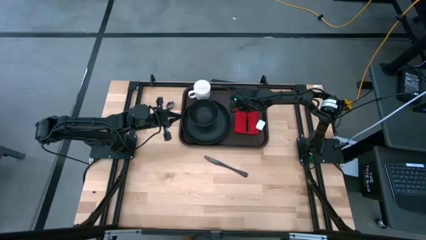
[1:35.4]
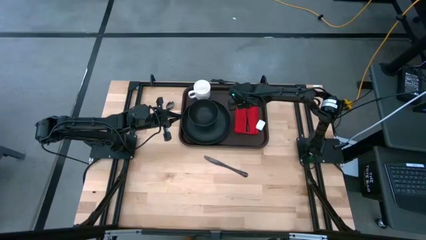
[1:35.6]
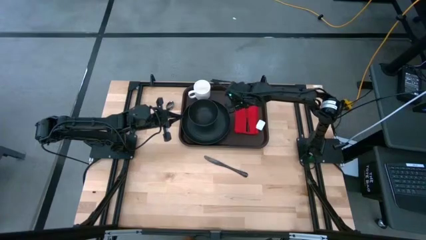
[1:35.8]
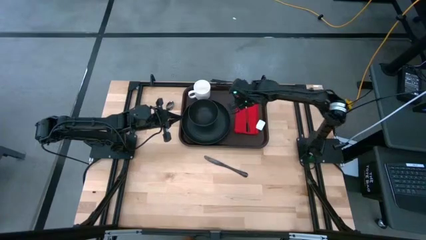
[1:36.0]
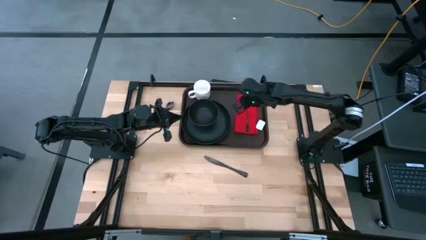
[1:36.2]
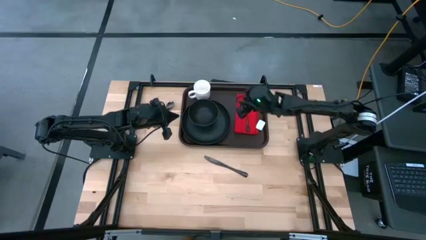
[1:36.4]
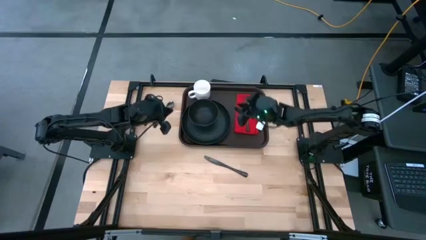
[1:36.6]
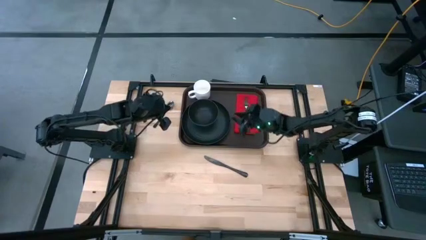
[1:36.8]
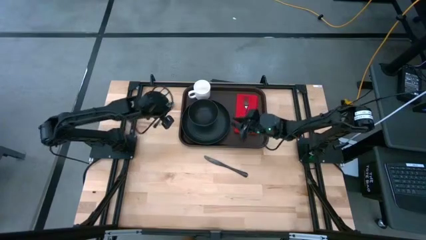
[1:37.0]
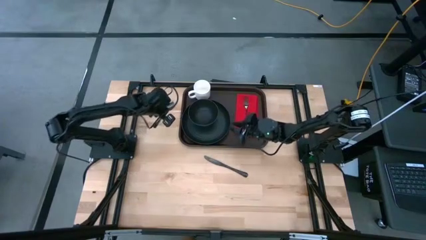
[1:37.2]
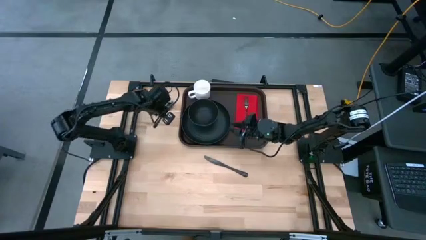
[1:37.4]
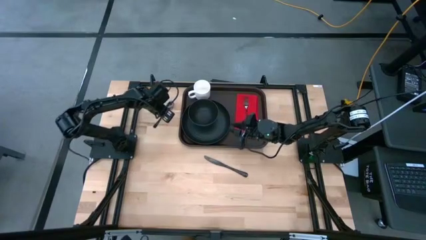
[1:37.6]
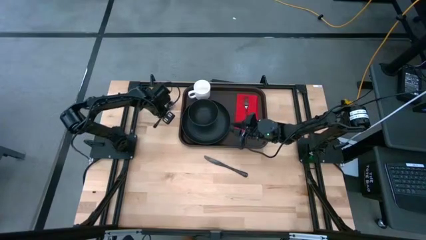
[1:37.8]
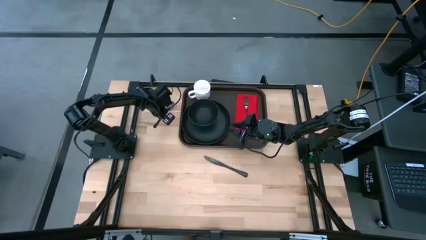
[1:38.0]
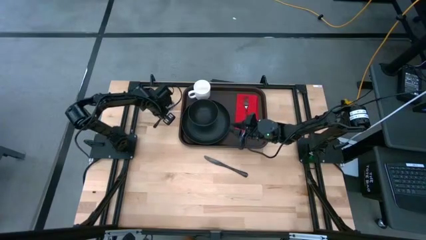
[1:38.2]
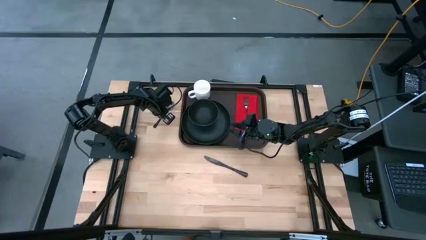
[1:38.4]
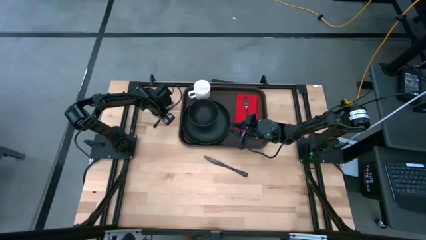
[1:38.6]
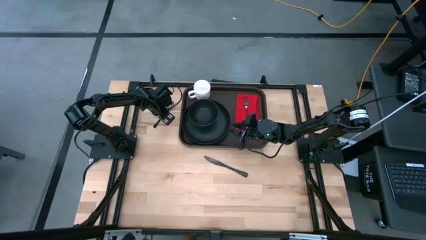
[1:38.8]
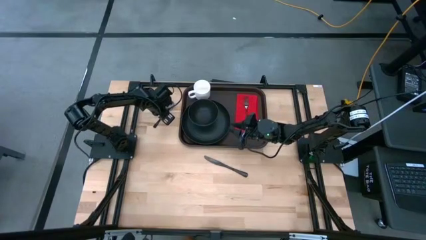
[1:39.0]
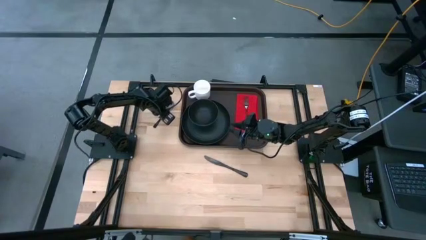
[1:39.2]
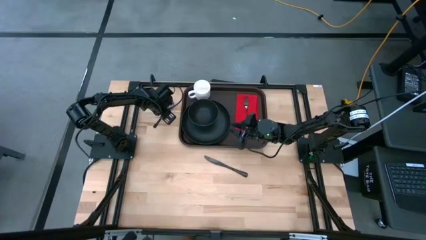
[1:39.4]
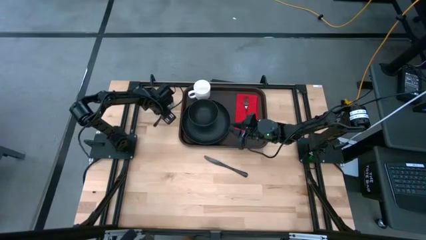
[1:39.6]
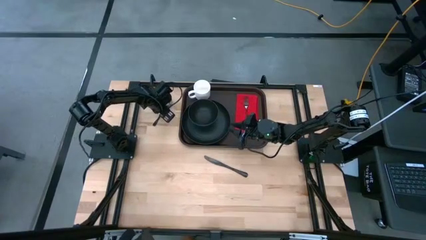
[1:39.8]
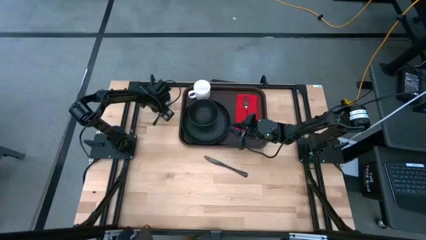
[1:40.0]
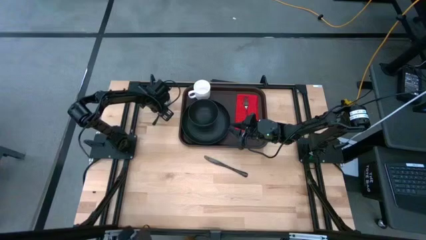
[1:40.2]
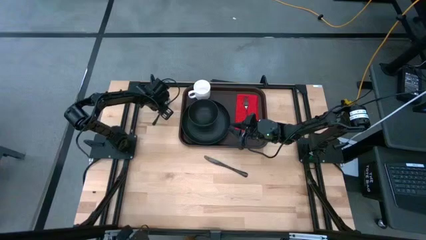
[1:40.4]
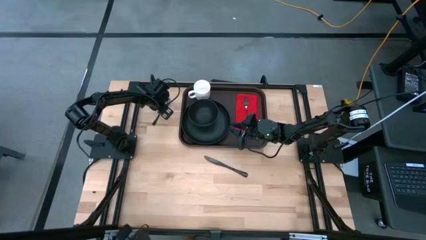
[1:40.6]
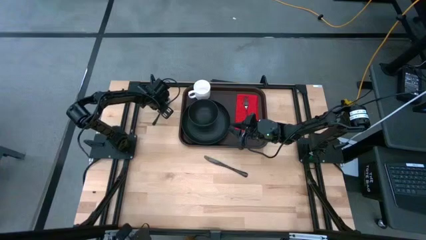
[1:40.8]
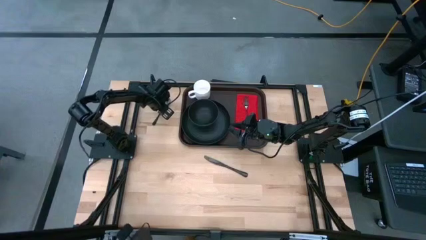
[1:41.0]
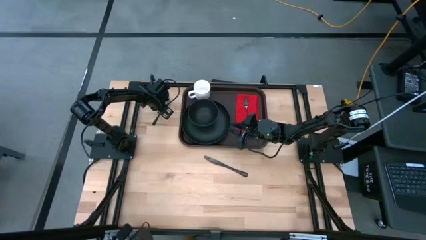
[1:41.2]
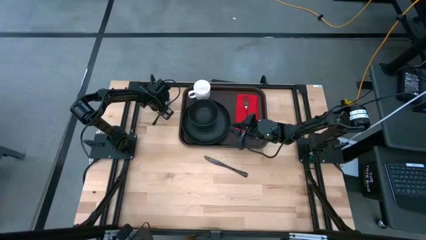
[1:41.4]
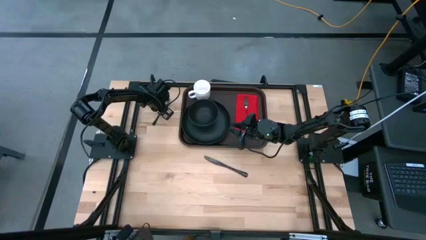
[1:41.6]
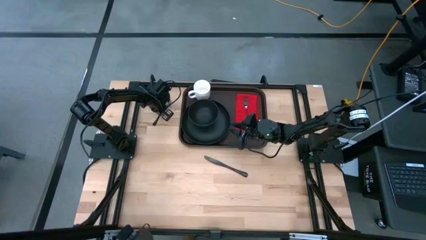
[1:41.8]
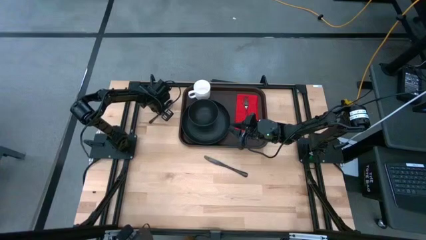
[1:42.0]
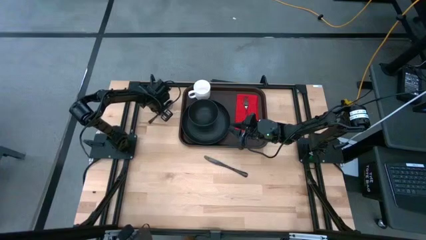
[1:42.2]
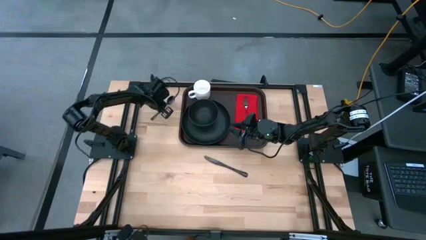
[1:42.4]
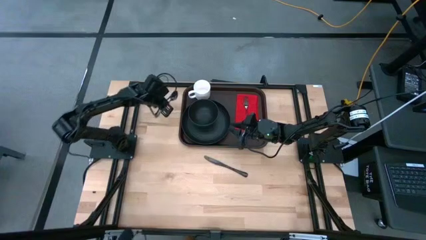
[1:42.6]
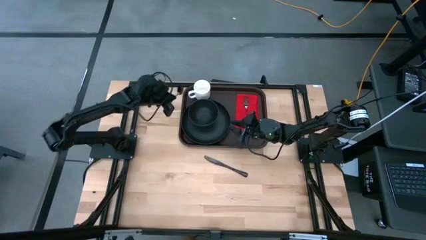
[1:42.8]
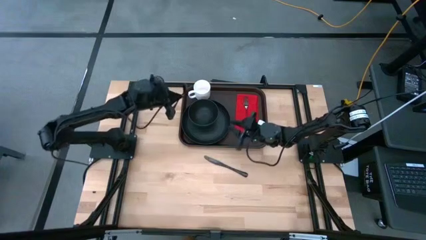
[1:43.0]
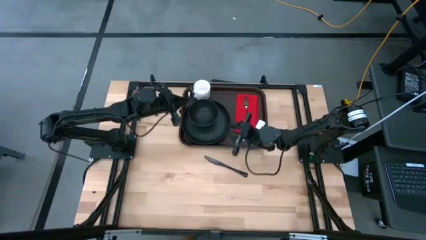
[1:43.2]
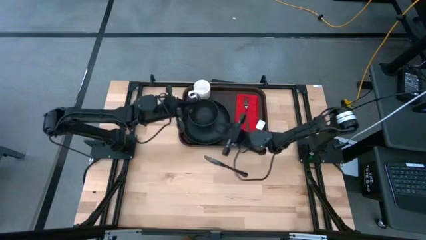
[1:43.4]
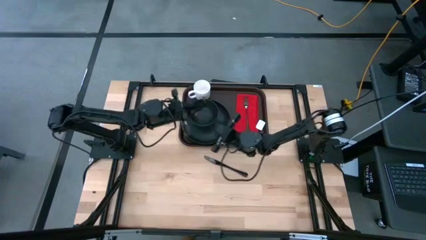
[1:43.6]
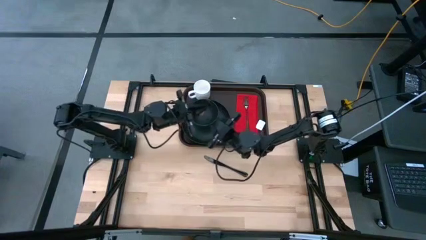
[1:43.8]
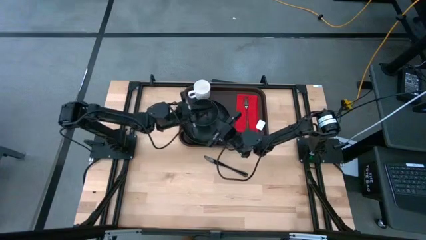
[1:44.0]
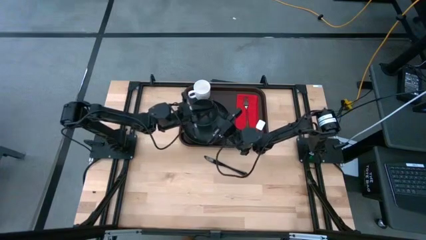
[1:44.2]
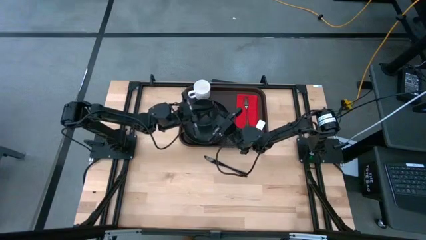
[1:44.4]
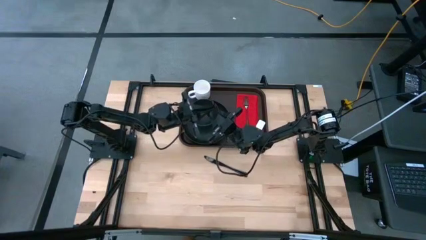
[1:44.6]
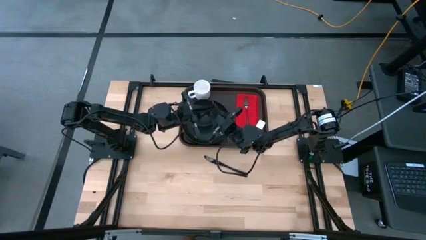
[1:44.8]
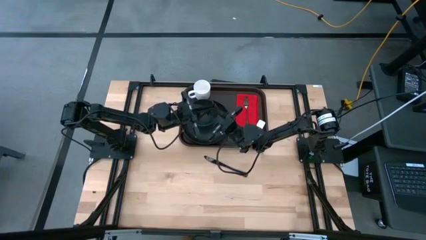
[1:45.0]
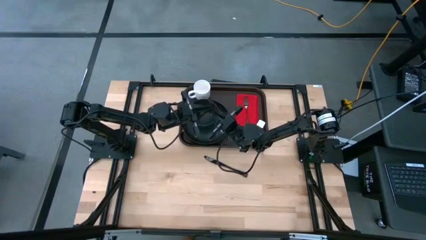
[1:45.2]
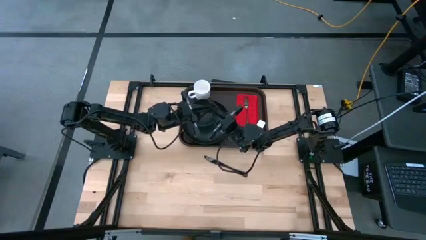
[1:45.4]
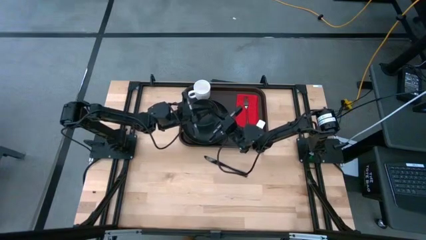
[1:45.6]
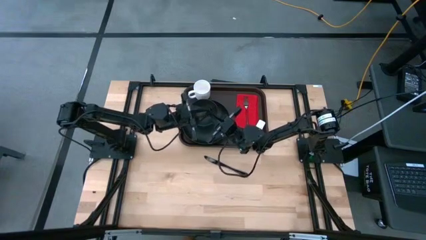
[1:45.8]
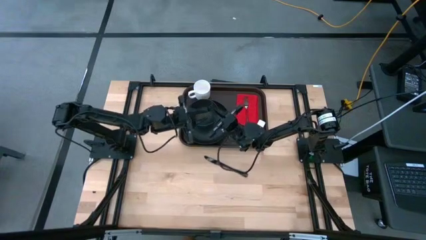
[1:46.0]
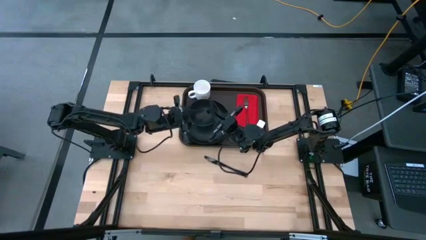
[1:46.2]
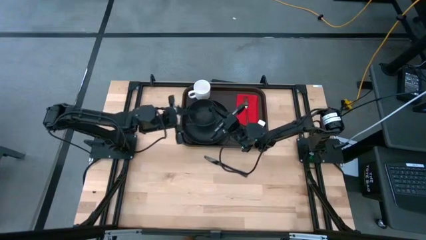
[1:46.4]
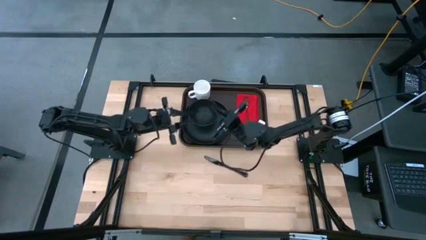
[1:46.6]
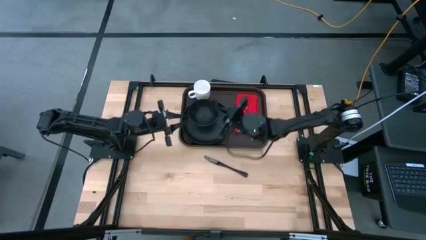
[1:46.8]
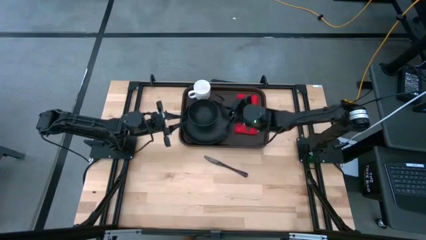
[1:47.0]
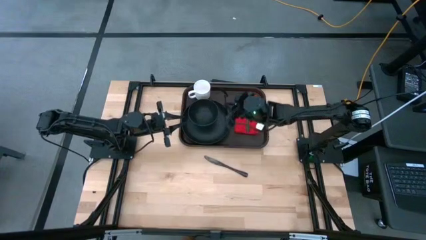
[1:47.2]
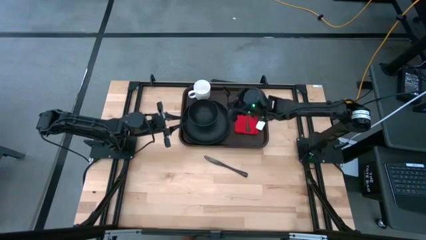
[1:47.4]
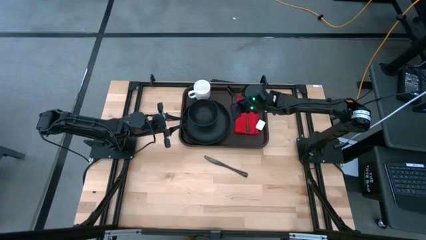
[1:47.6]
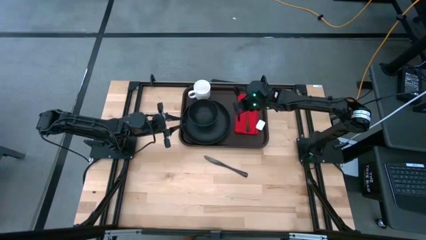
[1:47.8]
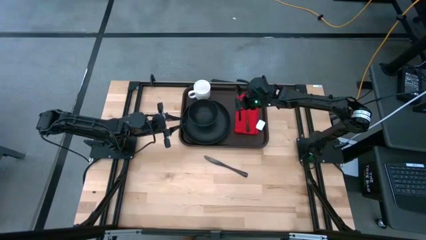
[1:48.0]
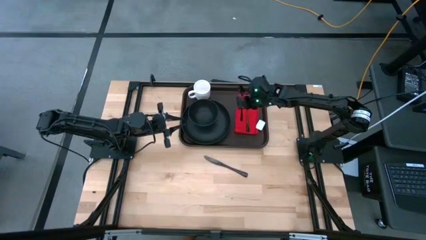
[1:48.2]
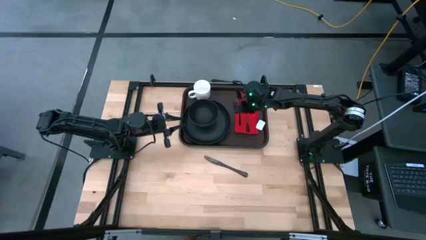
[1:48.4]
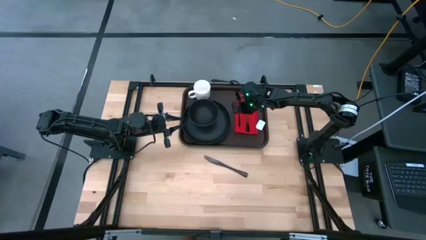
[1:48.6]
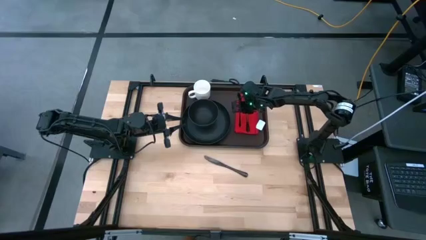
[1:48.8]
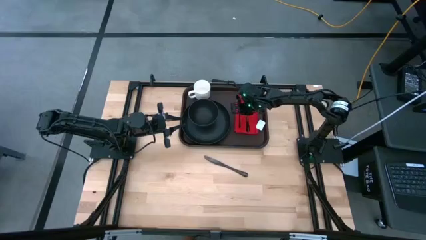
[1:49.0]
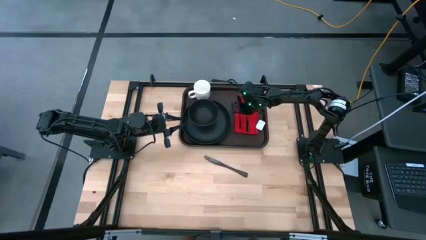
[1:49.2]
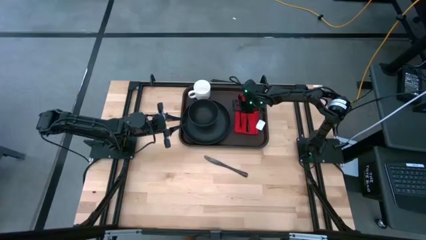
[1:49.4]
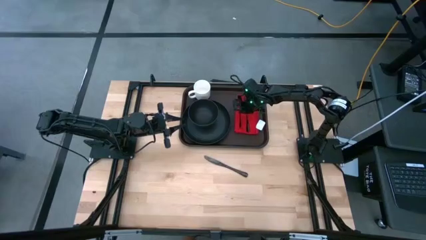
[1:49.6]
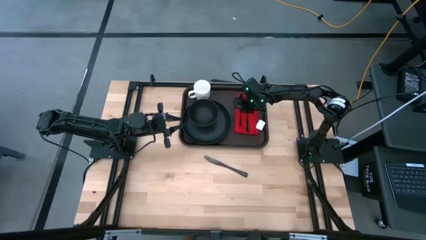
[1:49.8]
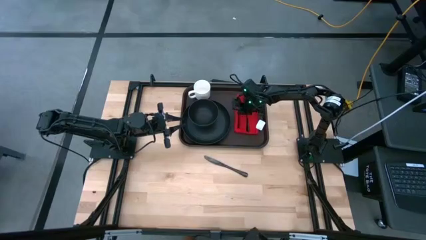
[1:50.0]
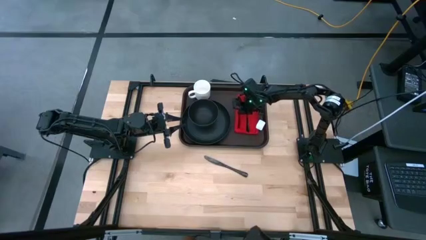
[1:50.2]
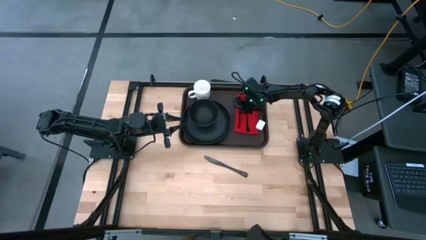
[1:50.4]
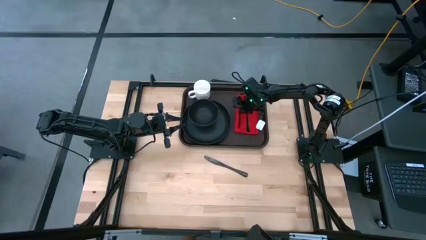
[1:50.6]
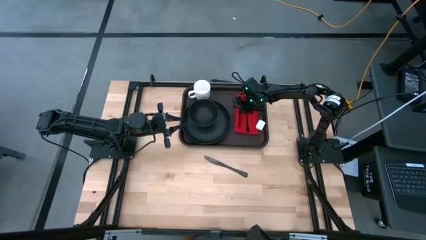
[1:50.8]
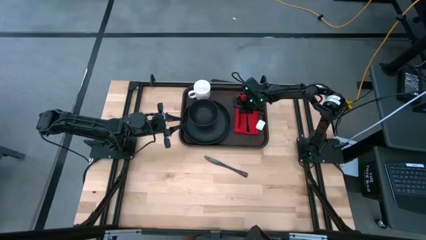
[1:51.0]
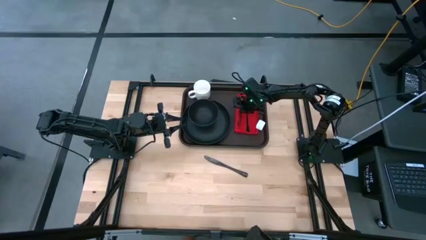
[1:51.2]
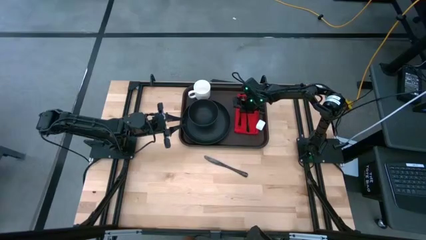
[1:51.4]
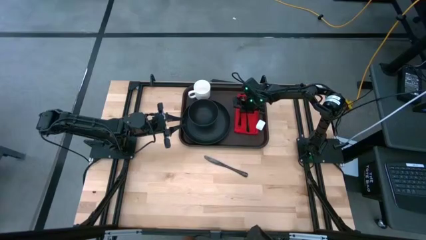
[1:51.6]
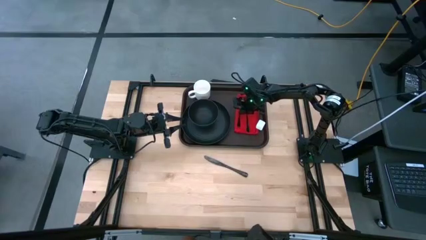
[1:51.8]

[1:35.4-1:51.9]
Task: Set up tray
Put the black spoon on top of the red napkin on the left side of the fork
